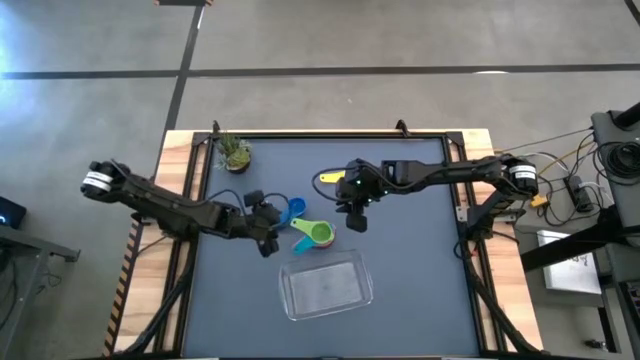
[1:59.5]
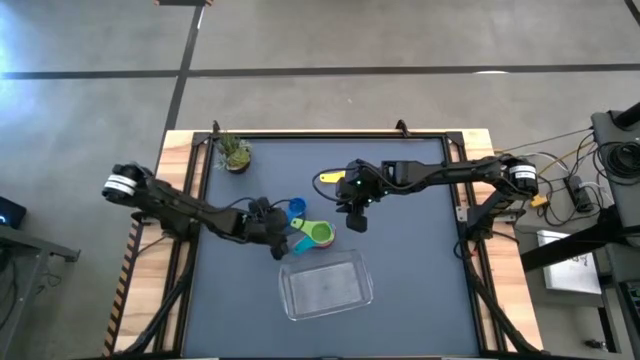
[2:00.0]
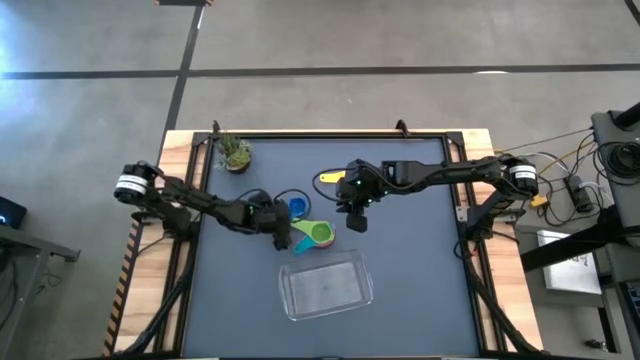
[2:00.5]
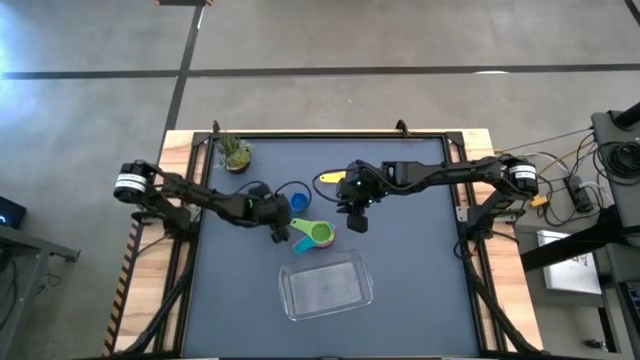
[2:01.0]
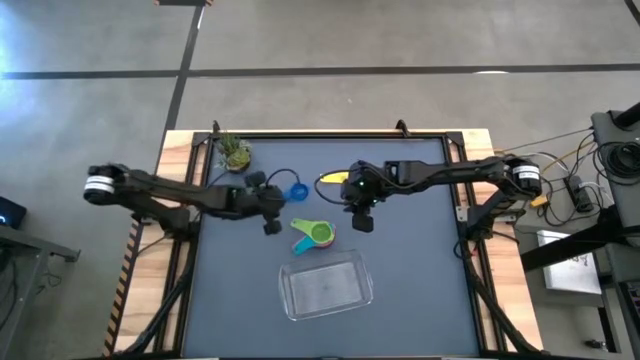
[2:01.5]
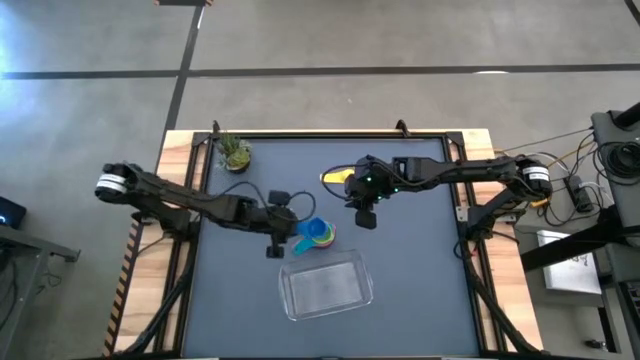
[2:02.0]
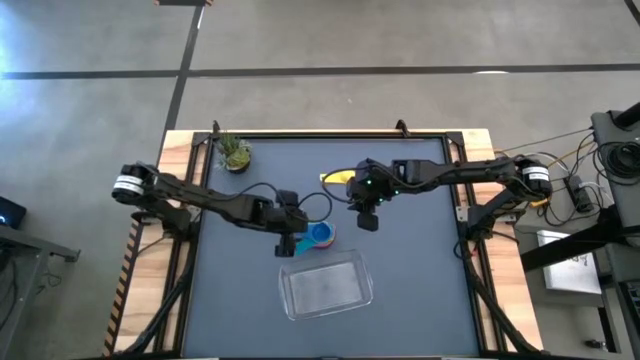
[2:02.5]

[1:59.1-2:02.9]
Task: Nest measuring cups in basket
Stack the blue measuring cup on top of the green measuring cup

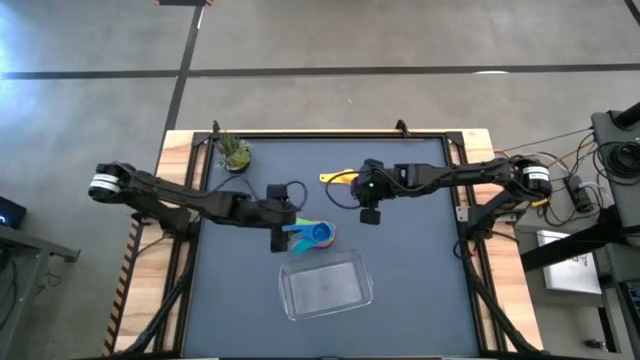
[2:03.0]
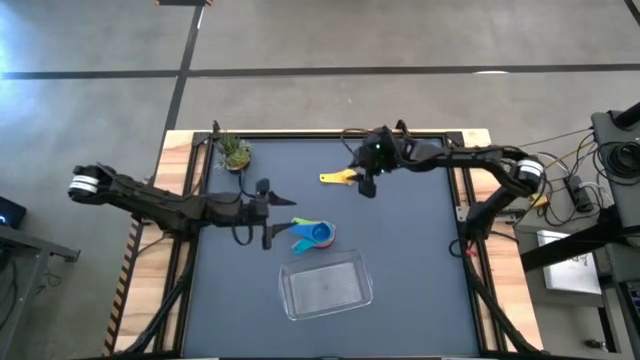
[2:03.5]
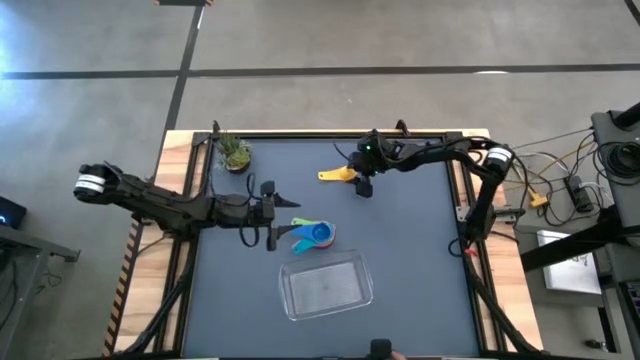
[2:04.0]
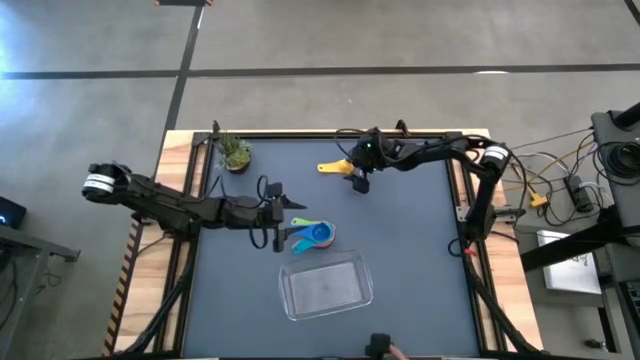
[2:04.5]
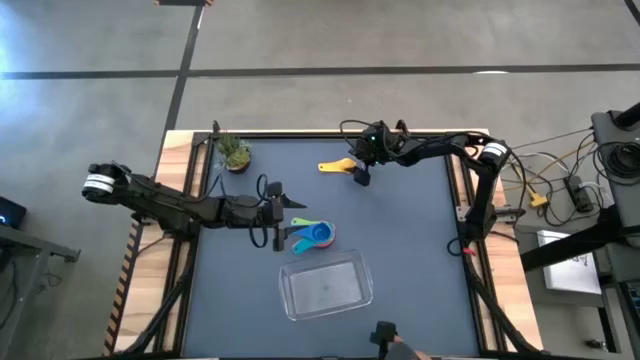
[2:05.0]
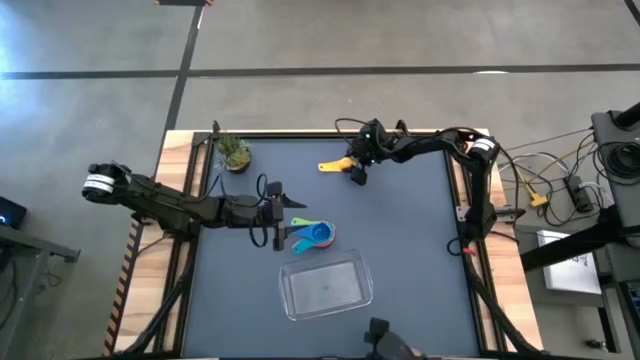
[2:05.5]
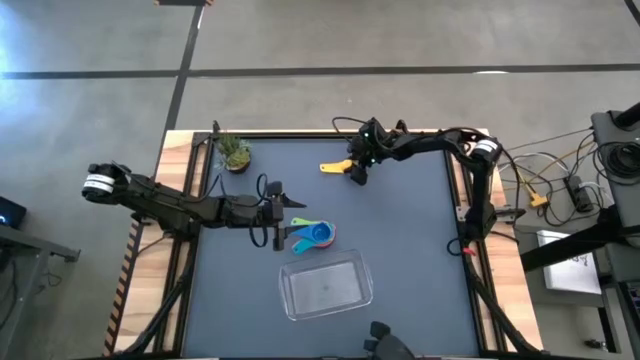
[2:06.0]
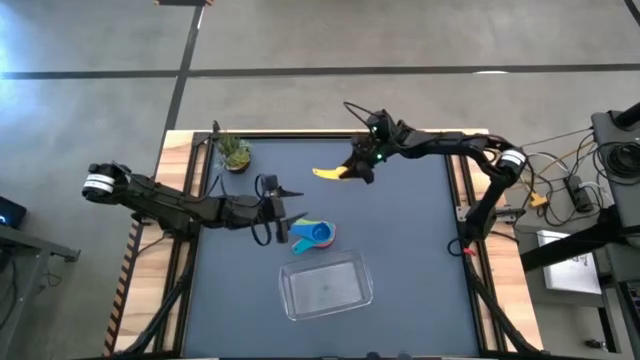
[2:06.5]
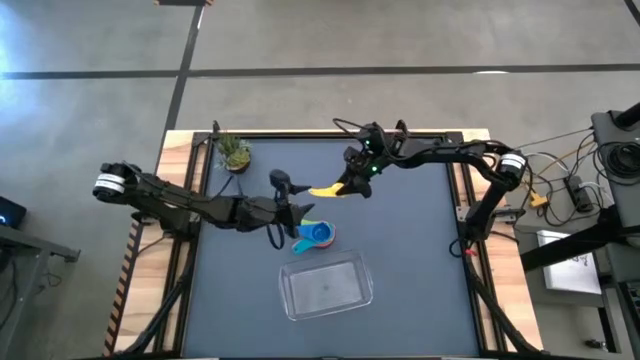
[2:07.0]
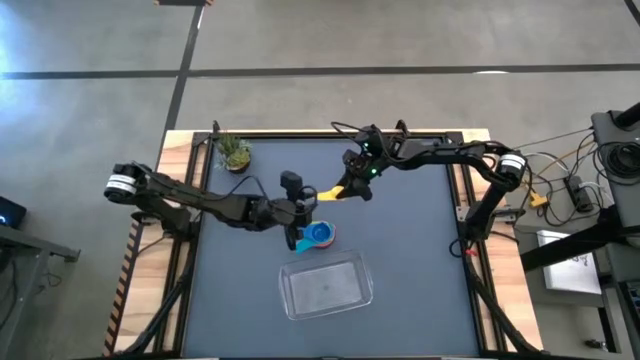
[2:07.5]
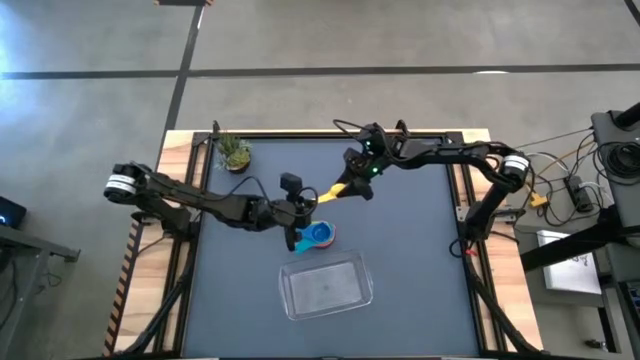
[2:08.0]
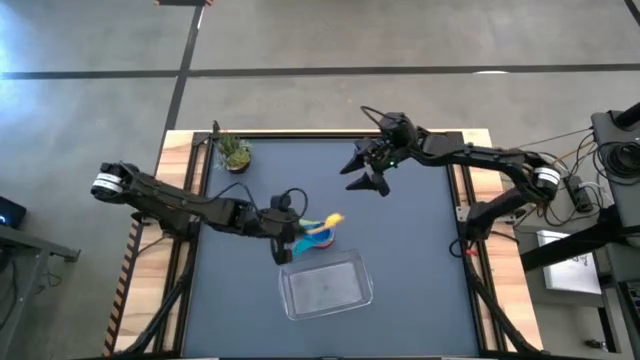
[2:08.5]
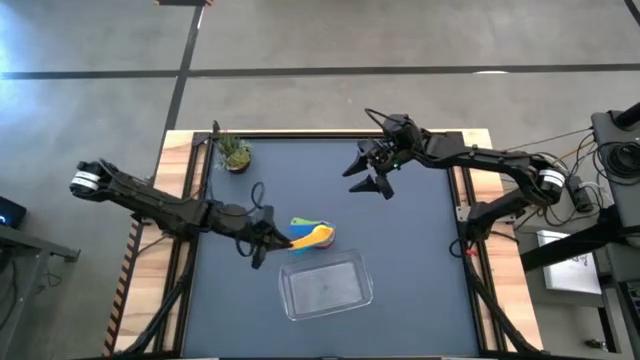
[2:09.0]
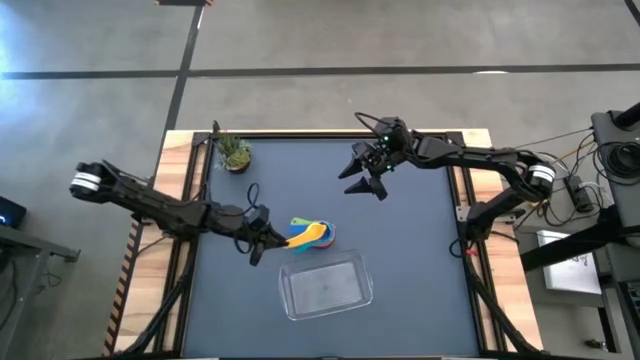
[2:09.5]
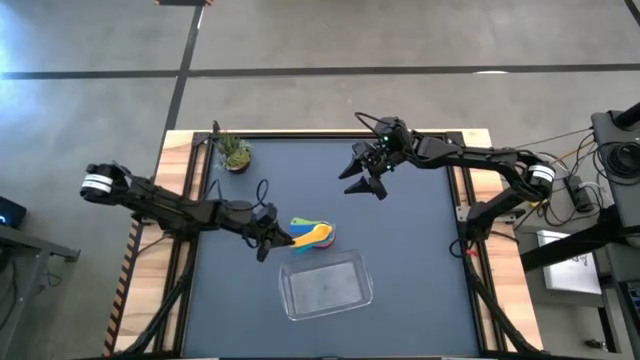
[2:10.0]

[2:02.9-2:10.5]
Stack the yellow measuring cup on top of the blue measuring cup

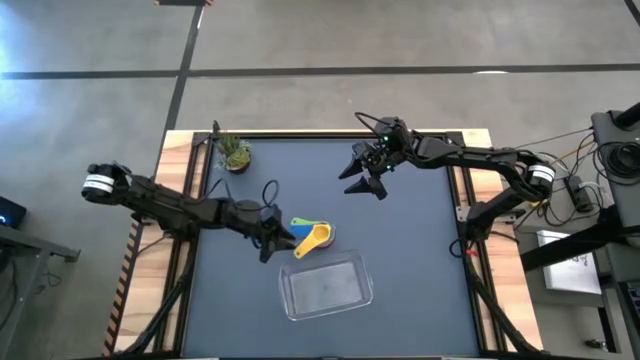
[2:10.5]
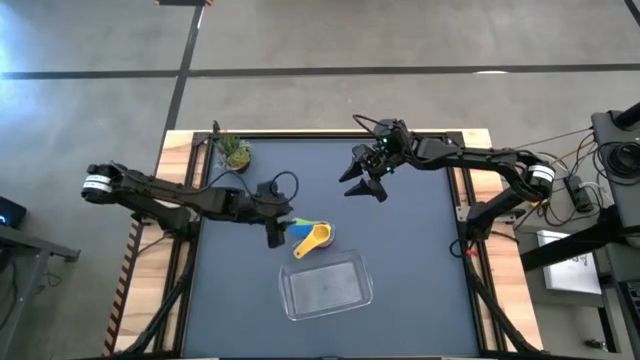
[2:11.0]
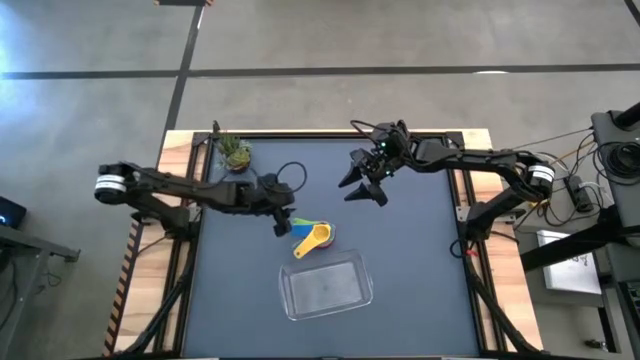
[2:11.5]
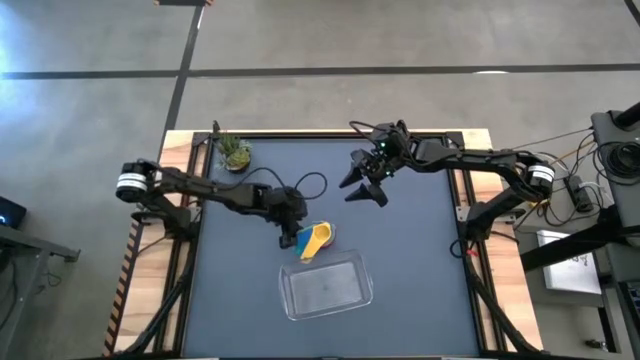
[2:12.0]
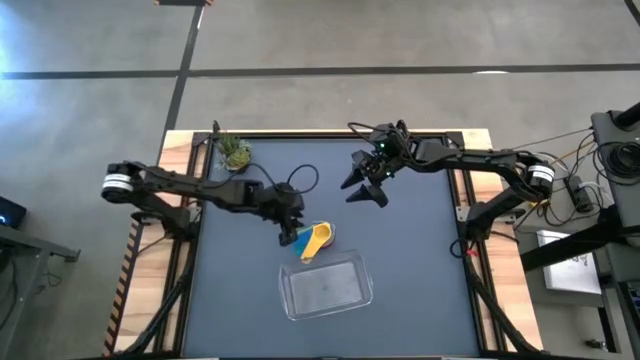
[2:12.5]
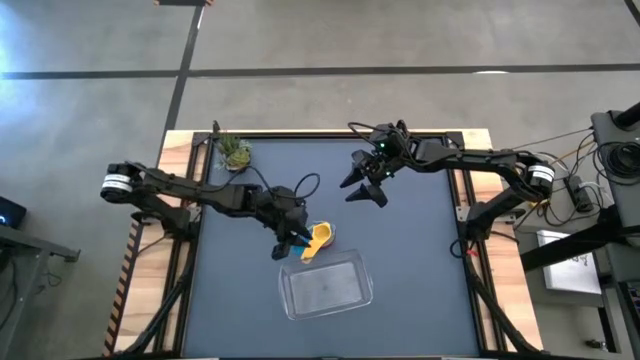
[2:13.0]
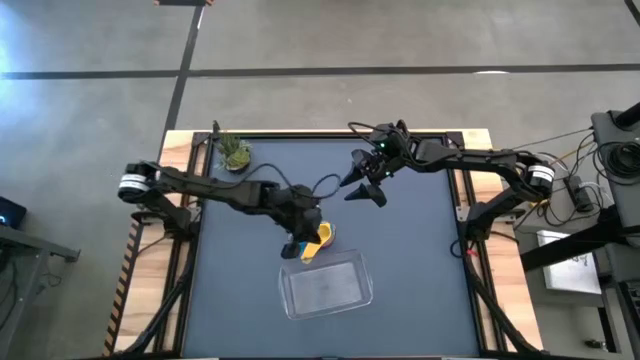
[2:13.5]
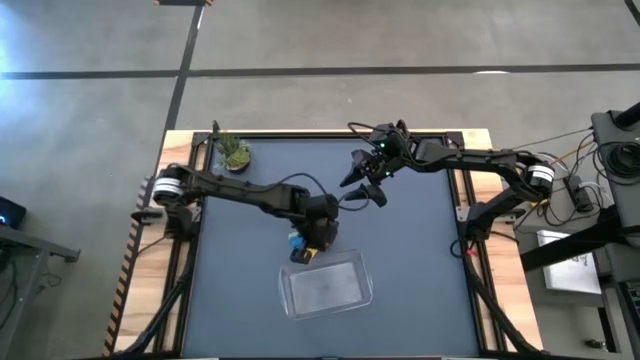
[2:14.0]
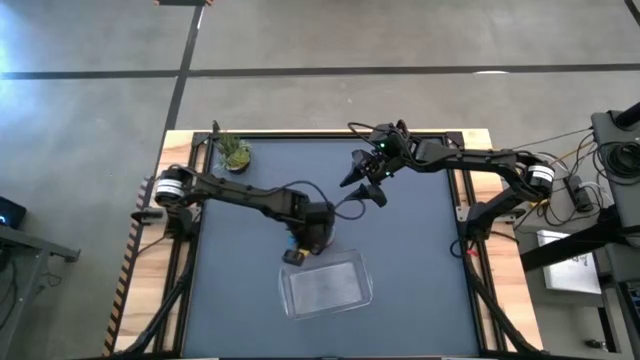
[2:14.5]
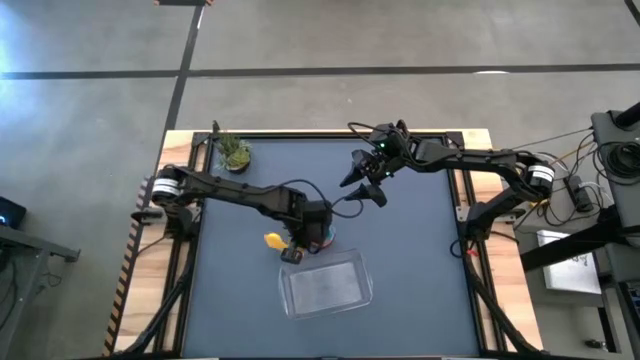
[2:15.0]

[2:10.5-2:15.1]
Adjust the nested measuring cups

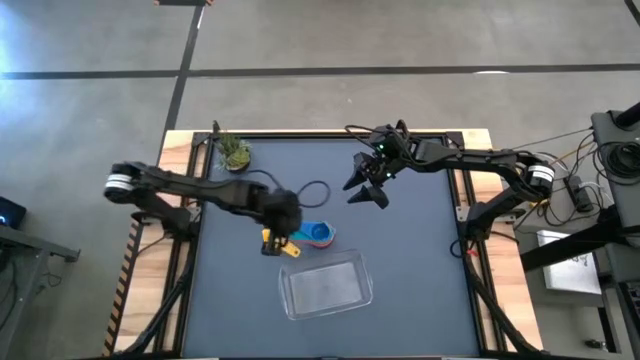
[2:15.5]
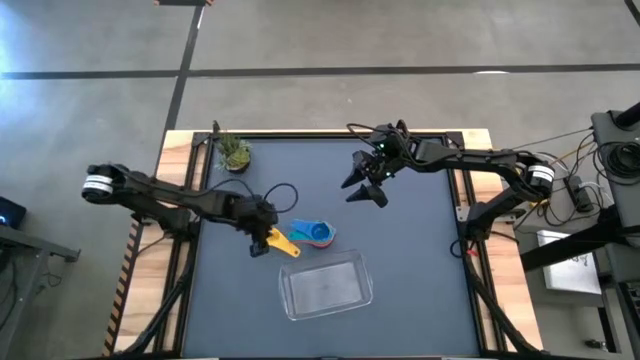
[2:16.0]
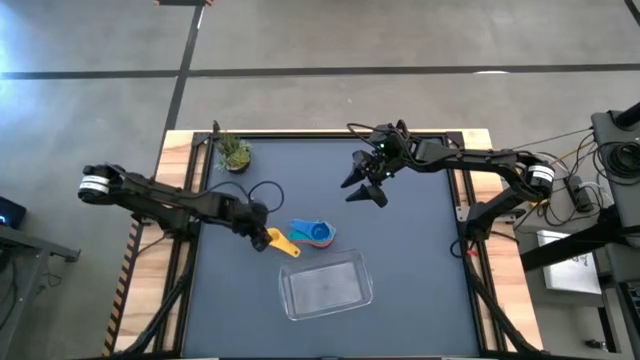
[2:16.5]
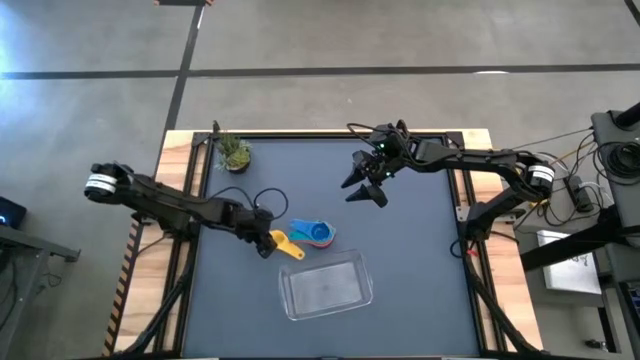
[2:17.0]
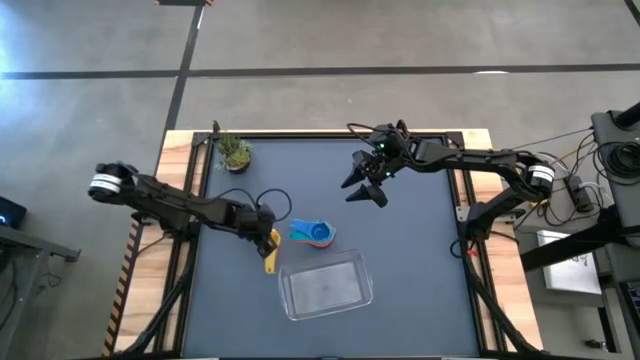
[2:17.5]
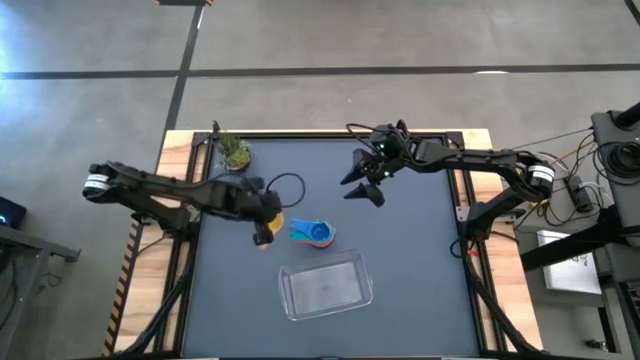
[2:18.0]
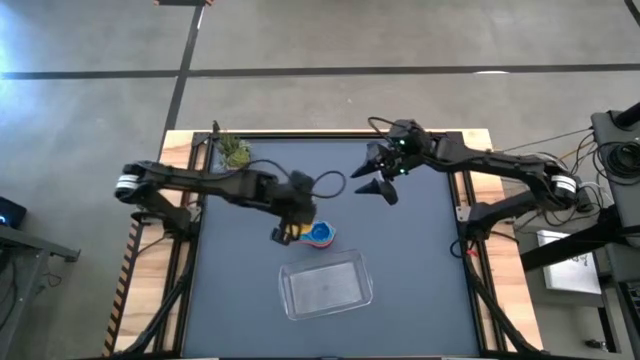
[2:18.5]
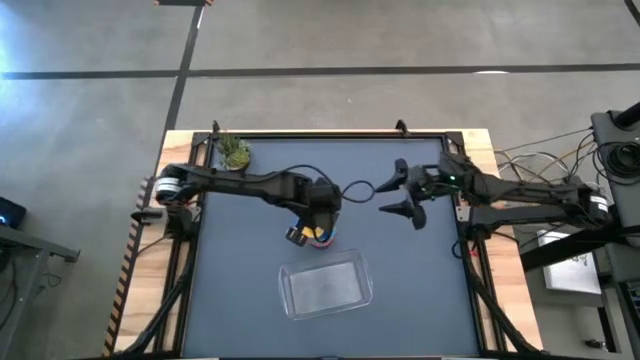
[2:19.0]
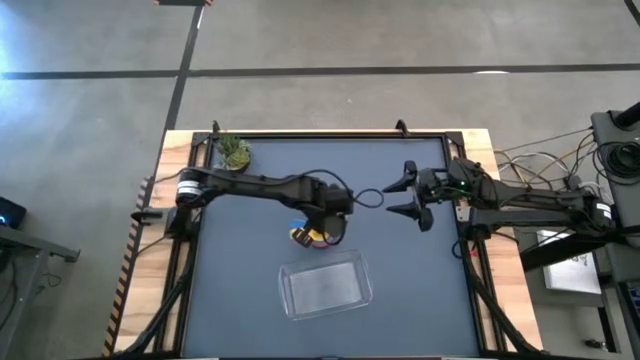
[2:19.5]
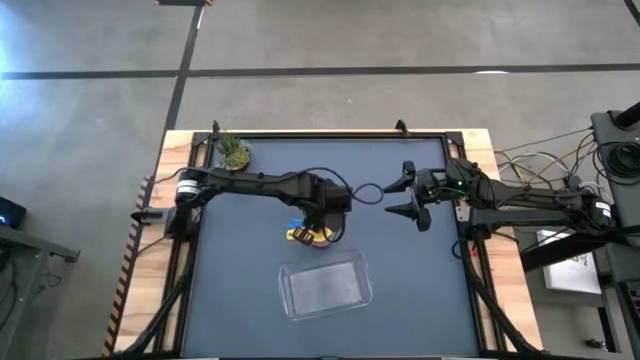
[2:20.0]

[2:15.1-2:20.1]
Stack the yellow measuring cup on top of the blue measuring cup
